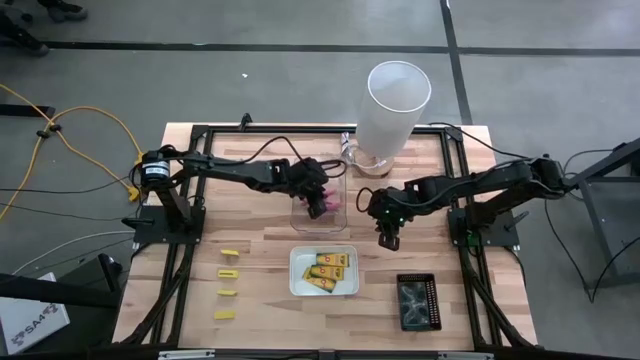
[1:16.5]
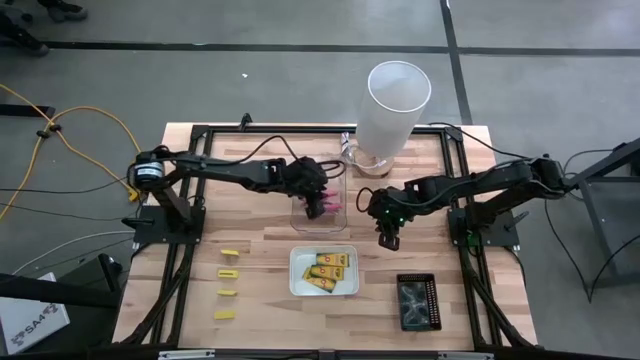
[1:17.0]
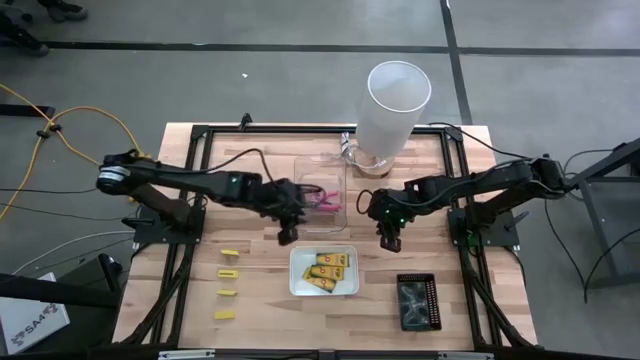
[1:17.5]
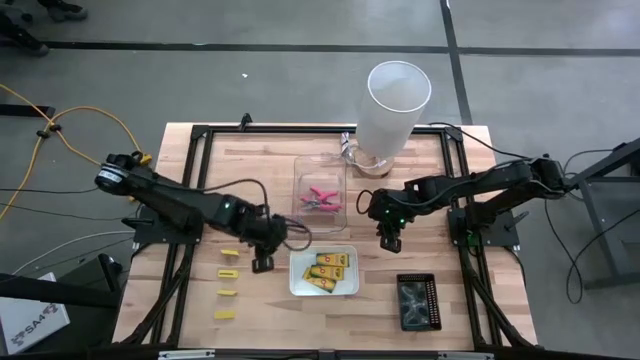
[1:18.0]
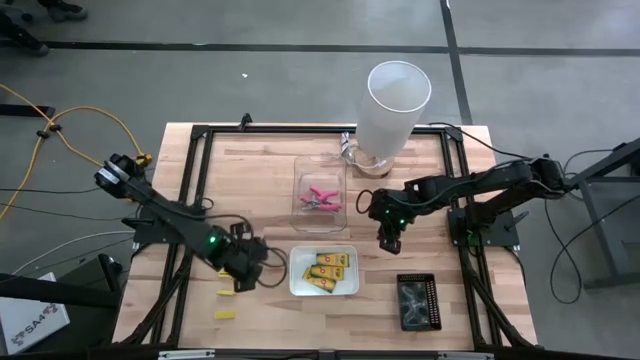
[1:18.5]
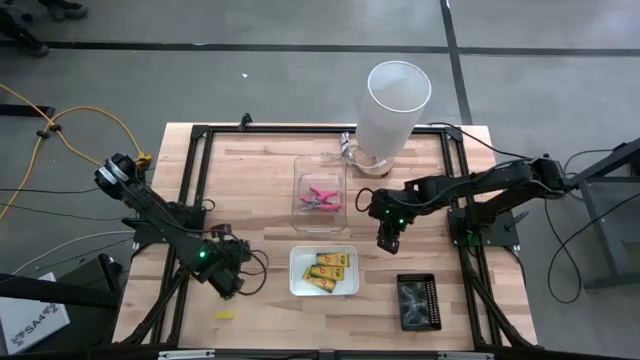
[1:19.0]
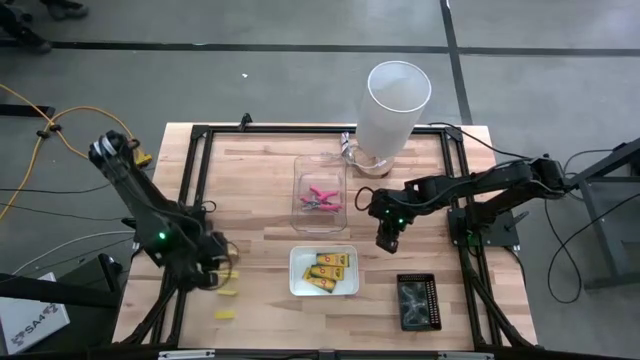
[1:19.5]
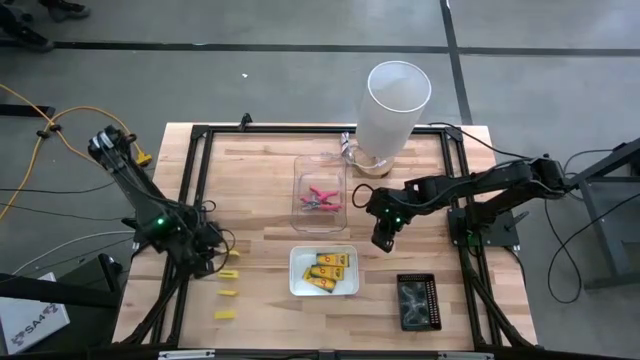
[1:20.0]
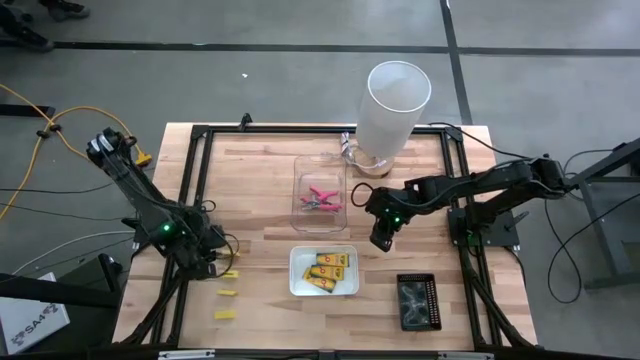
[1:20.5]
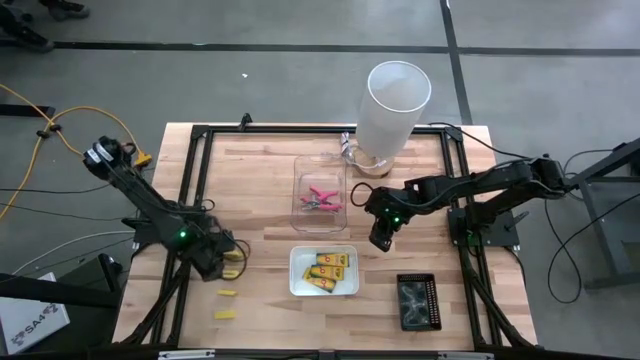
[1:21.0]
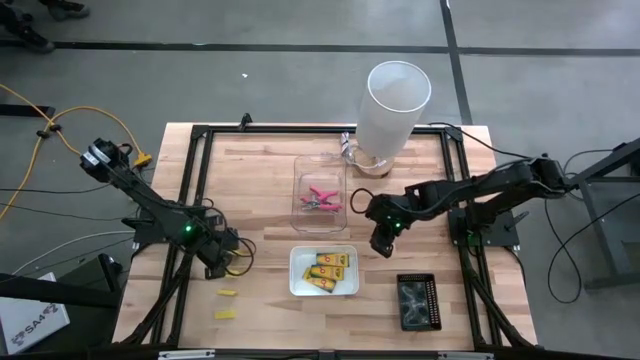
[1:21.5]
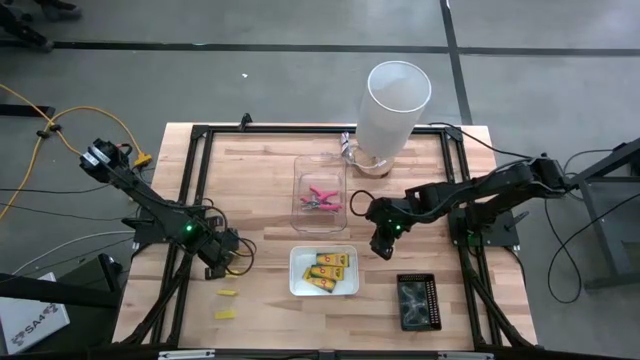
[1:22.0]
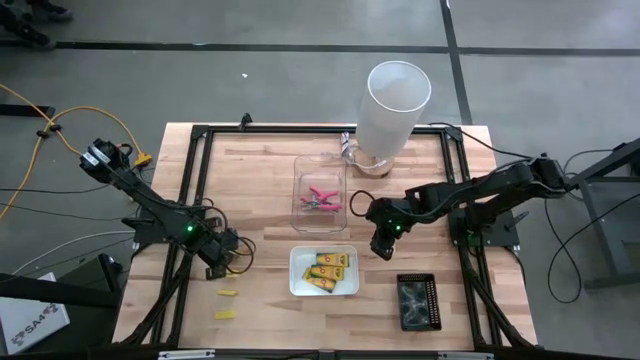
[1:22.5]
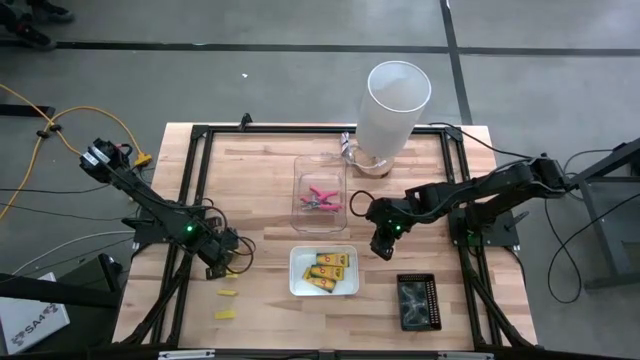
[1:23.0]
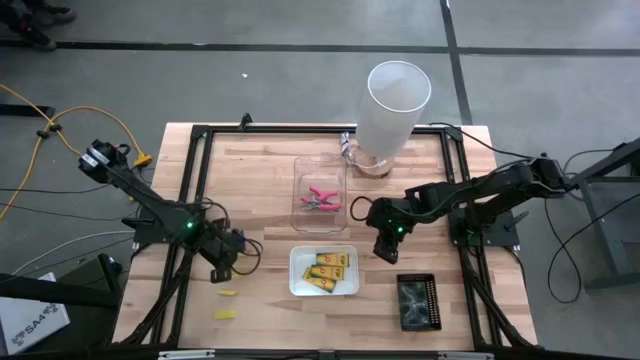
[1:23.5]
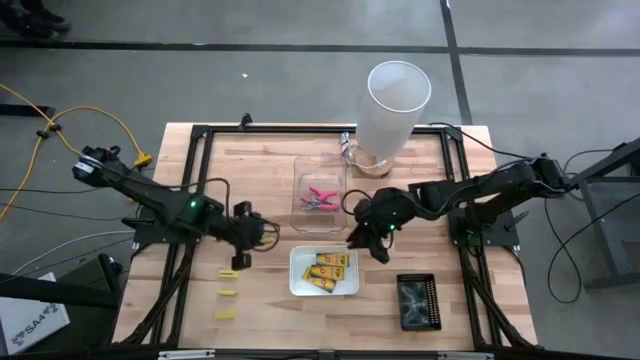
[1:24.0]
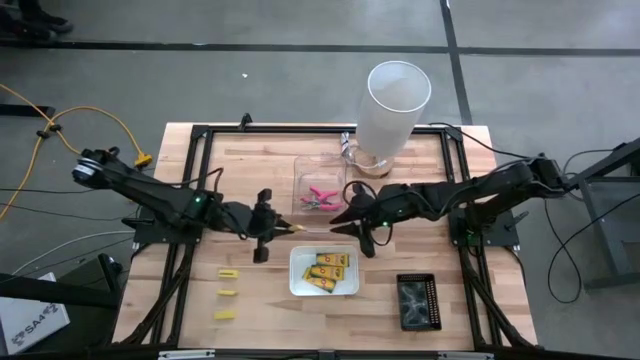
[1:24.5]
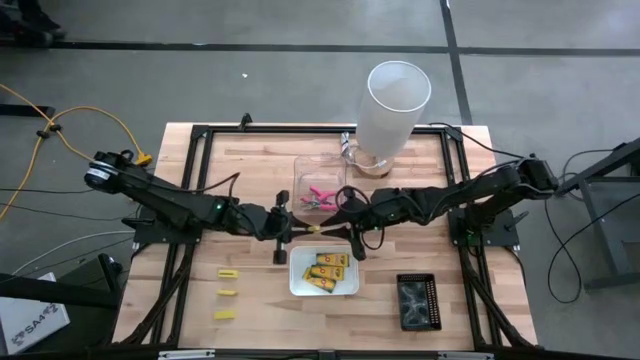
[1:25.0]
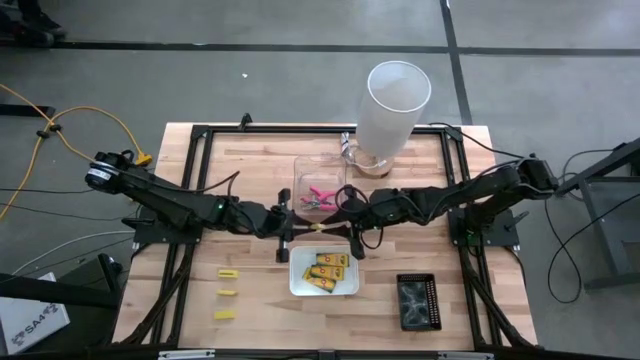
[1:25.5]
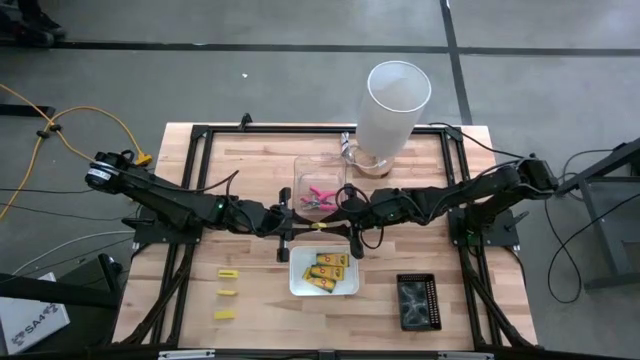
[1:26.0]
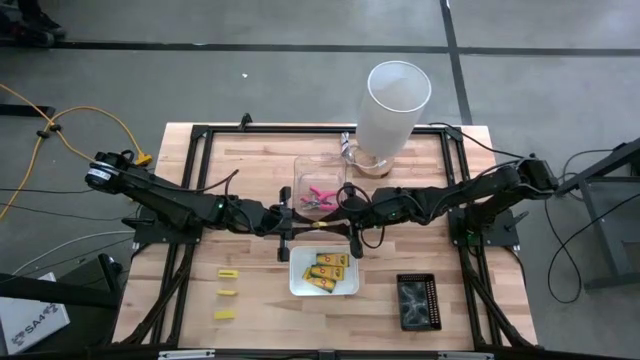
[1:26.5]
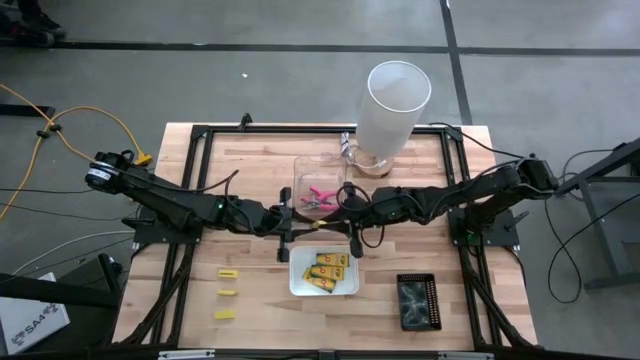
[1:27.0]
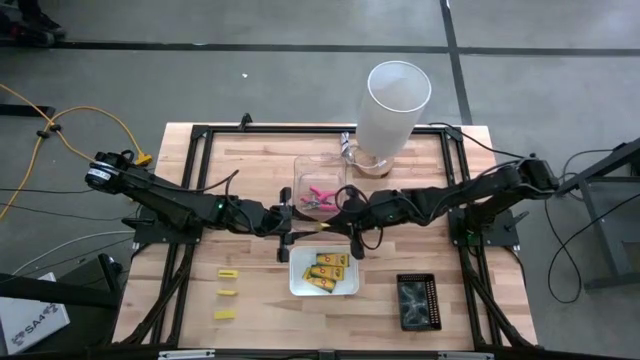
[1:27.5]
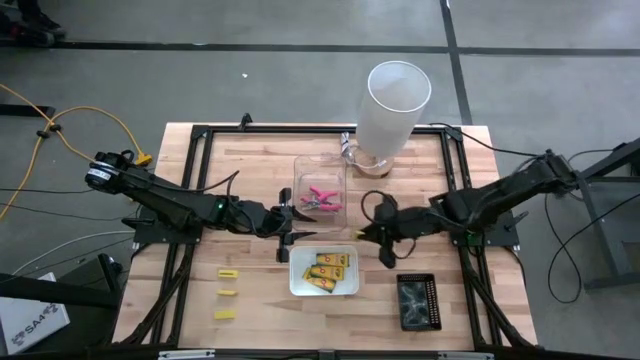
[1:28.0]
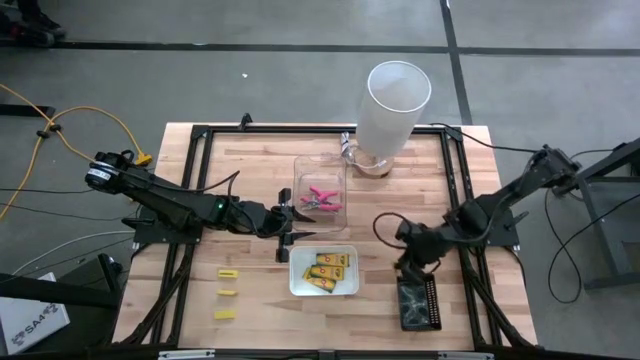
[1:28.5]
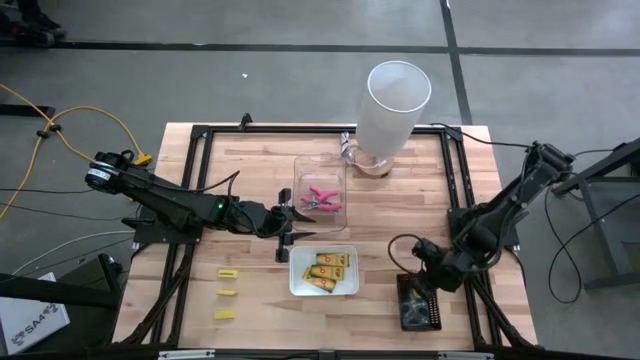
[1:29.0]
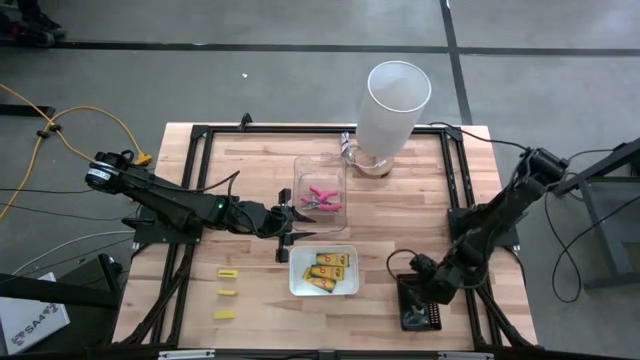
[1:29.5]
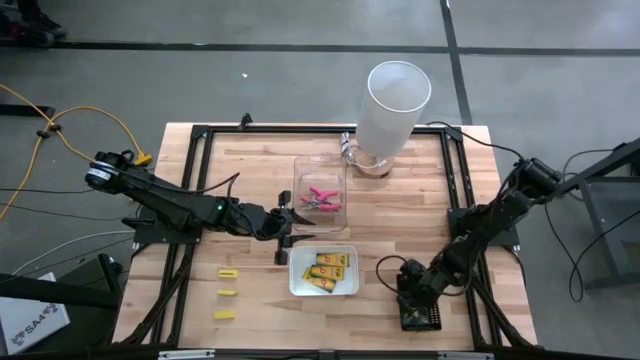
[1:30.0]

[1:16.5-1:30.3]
Task: Pick & Place School Supplies
Put the yellow eraser into the black bin

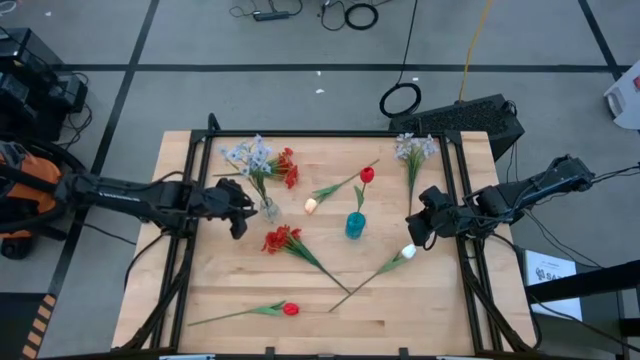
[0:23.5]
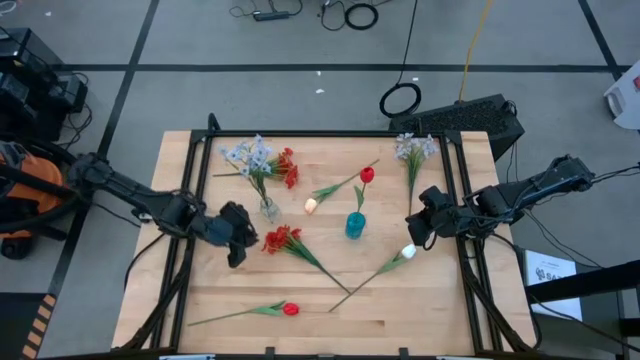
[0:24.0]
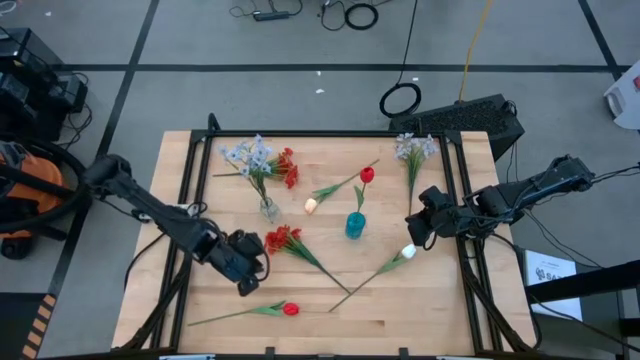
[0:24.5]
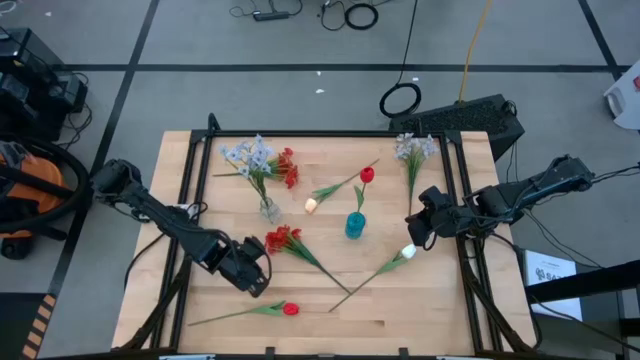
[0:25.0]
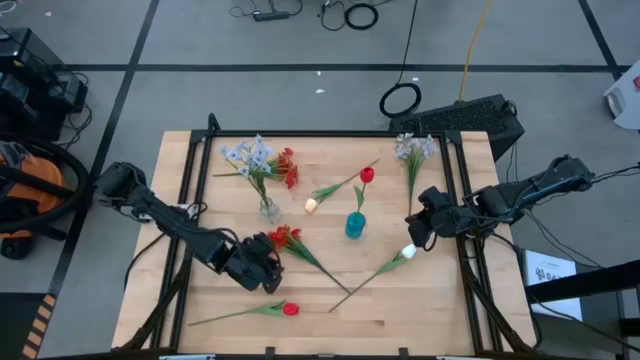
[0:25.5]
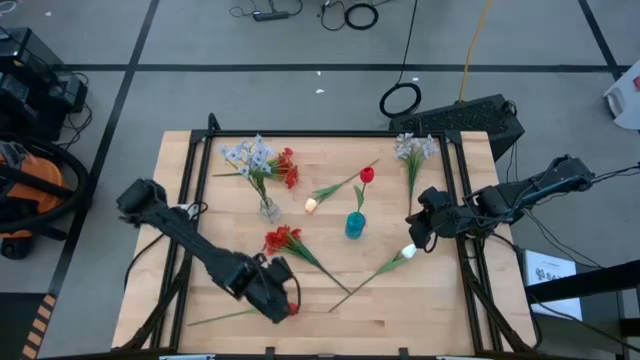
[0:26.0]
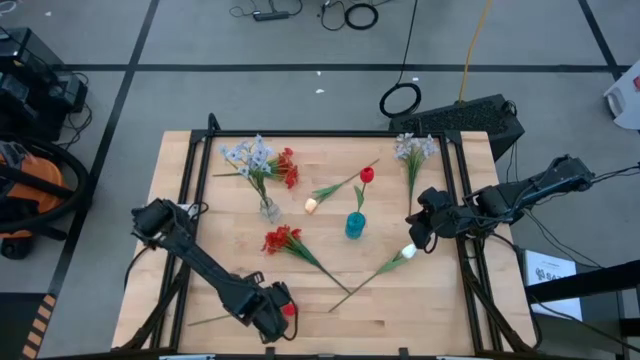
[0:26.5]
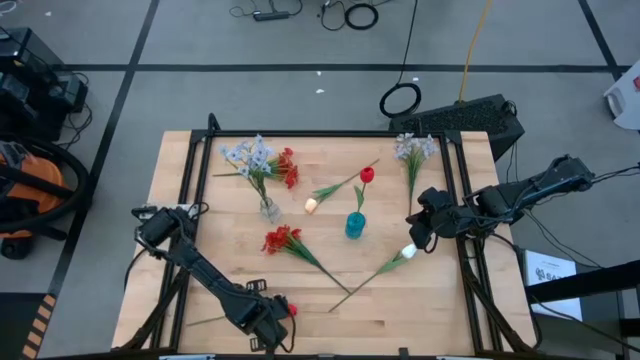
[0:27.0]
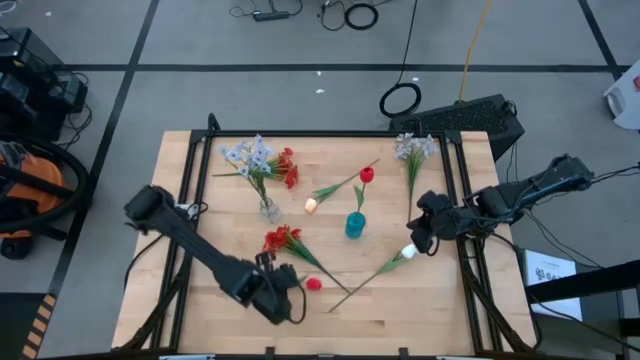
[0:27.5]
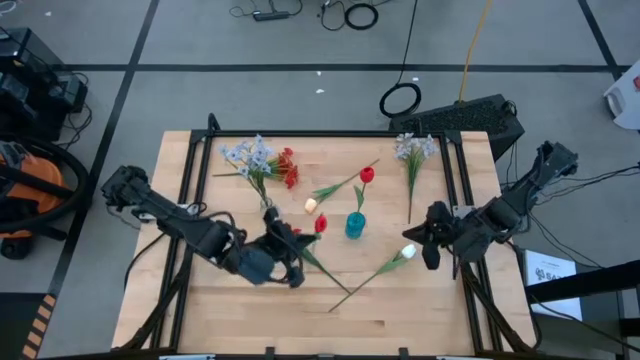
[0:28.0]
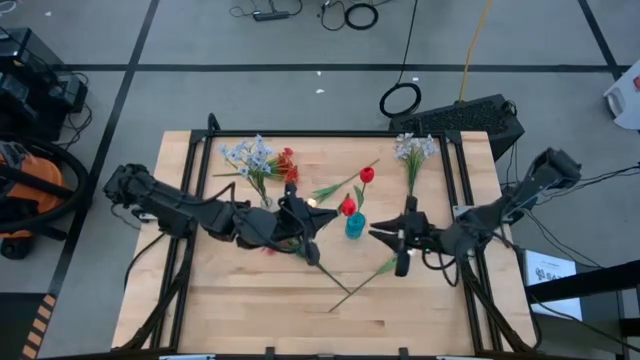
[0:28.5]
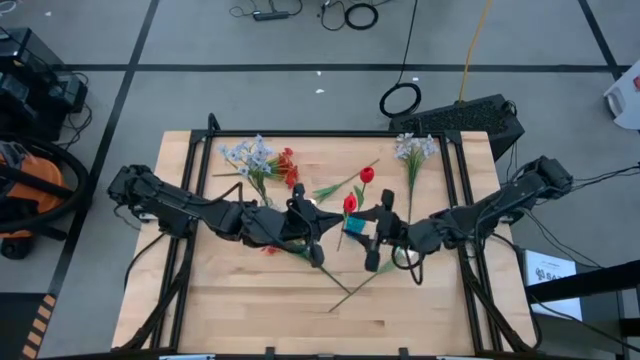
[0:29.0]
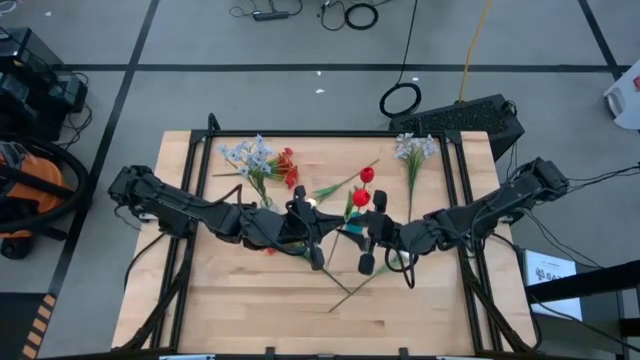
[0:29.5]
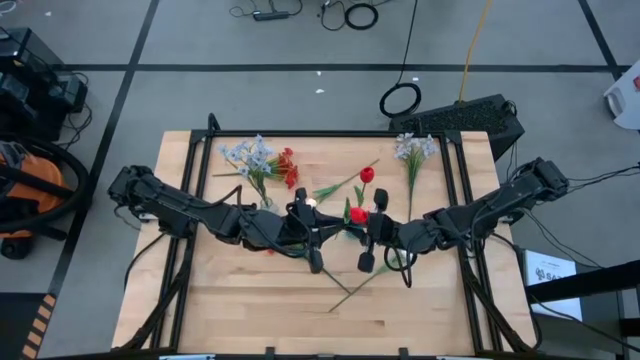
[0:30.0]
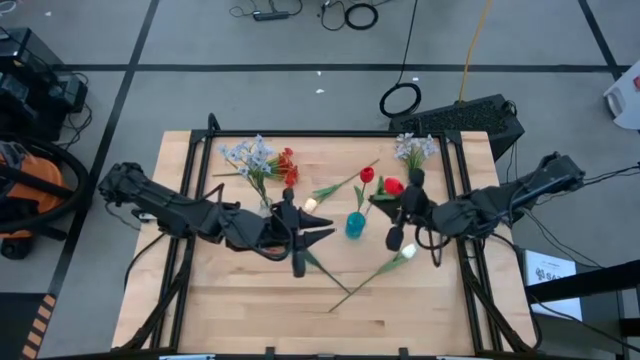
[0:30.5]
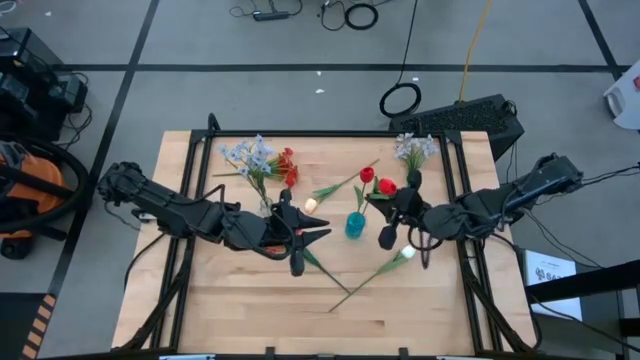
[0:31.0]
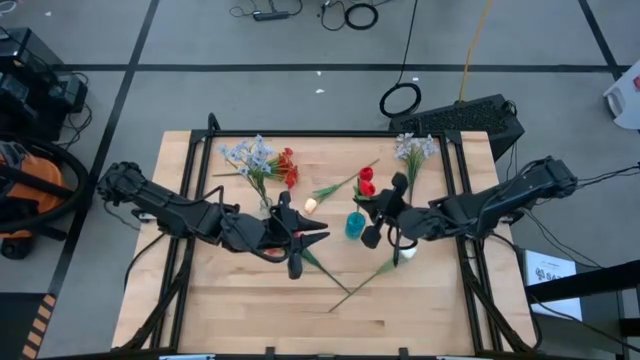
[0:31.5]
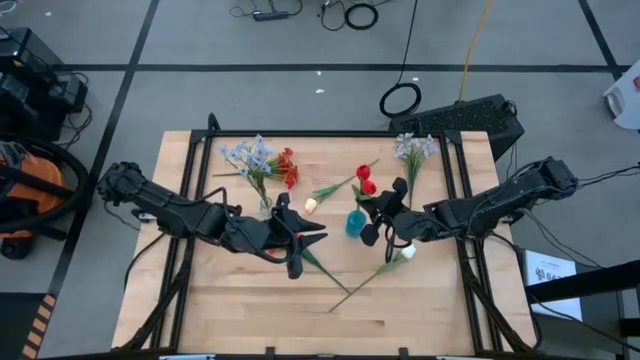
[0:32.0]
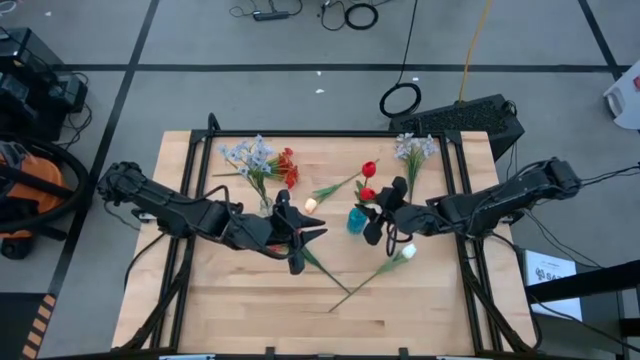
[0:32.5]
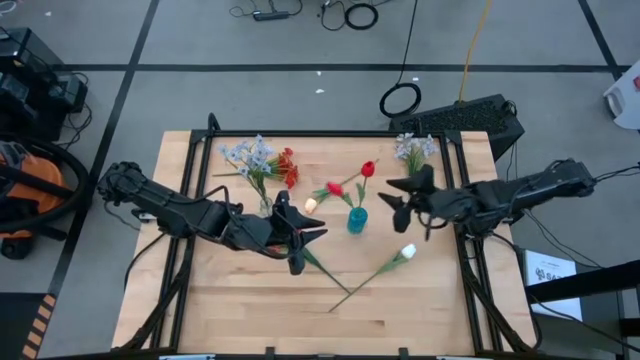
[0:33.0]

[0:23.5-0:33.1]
Task: Sort flowers into vase by color
Put the red tulip into the blue vase
